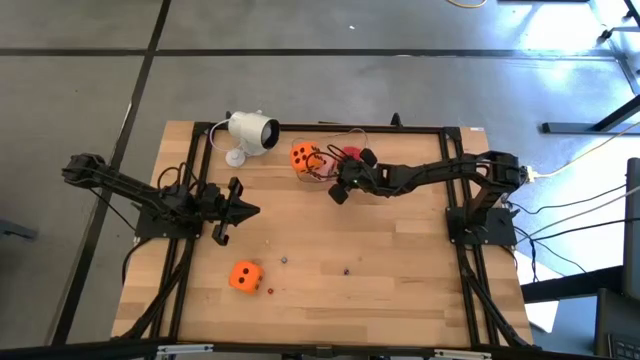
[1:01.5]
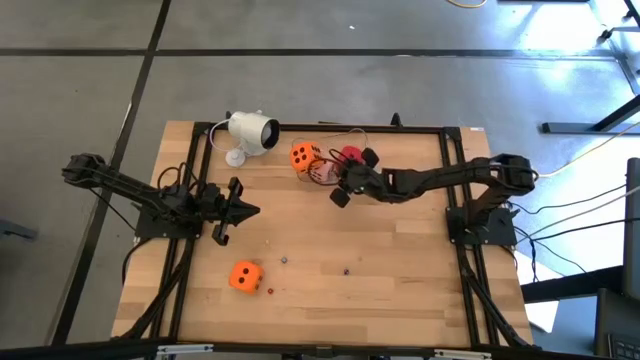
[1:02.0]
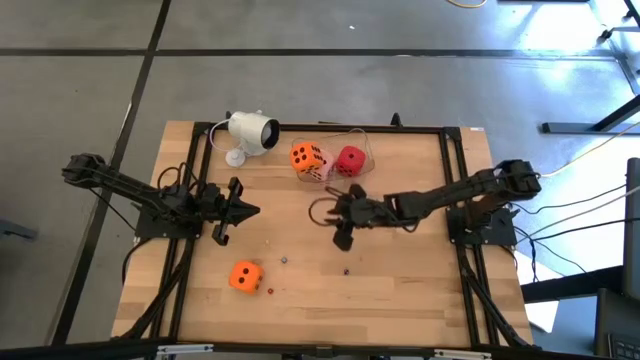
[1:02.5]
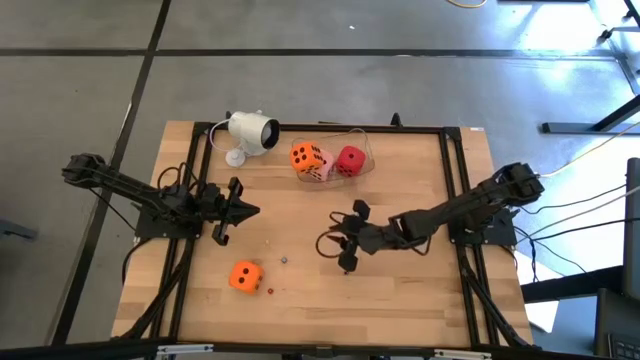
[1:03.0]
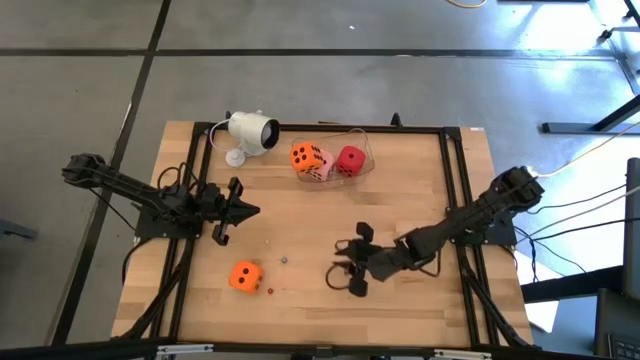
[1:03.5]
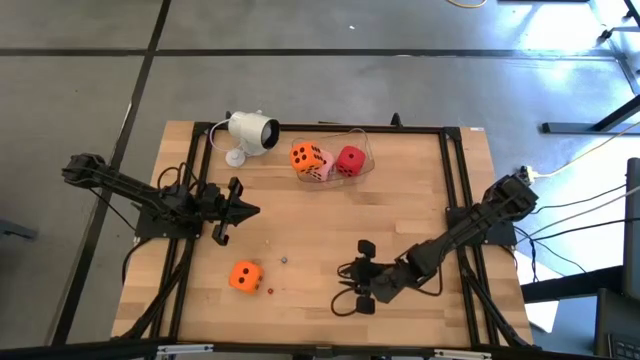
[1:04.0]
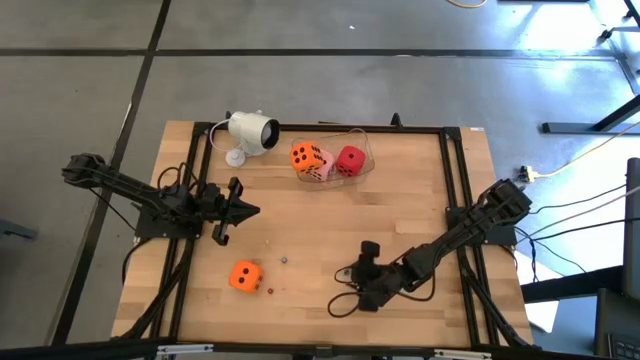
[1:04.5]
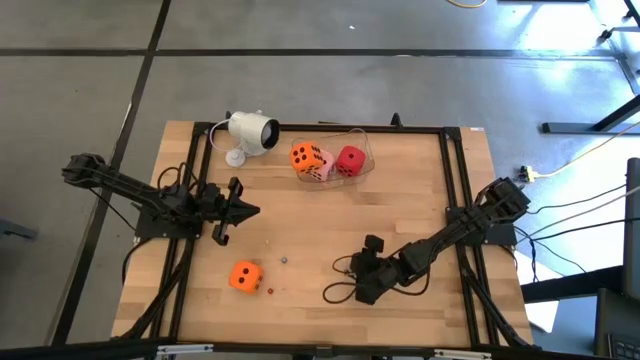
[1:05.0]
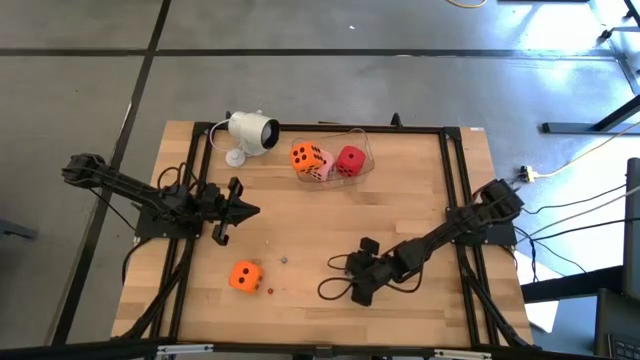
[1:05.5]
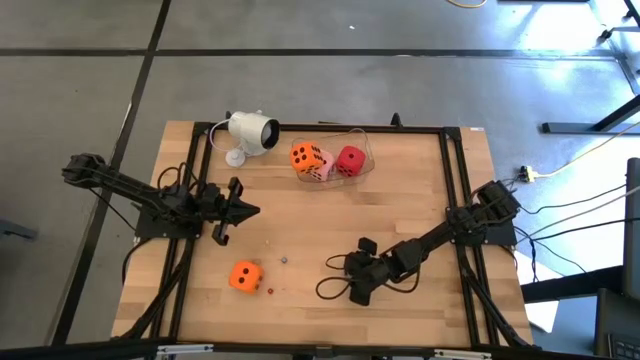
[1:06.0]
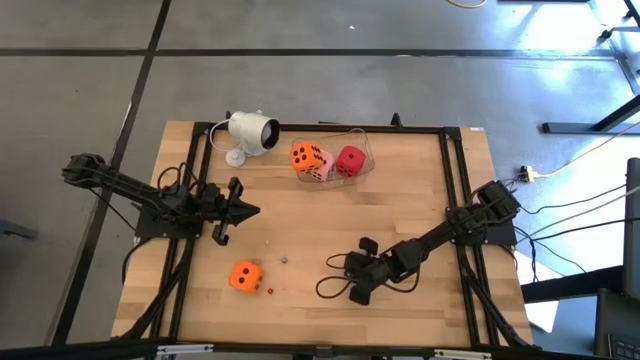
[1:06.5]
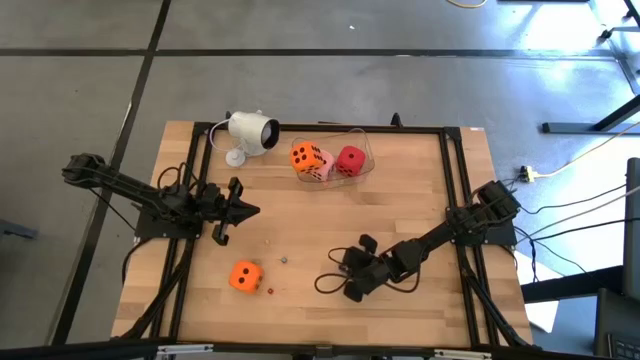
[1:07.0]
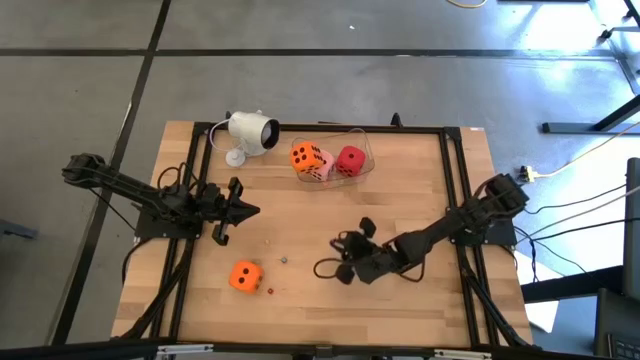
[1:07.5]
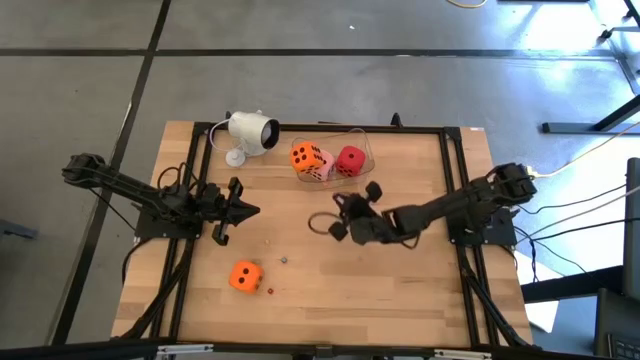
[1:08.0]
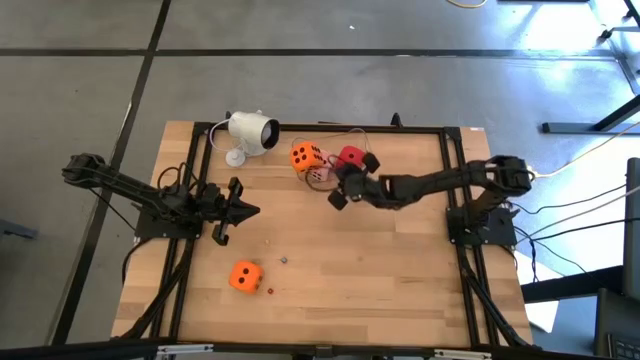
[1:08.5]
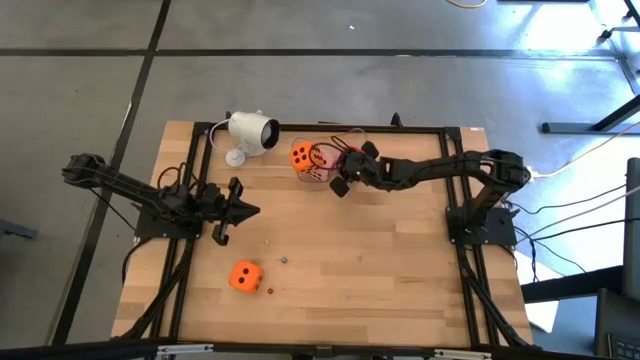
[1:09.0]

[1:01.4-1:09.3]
Task: Pick & Place Dice
Put the bottom small blue die into the transparent bin

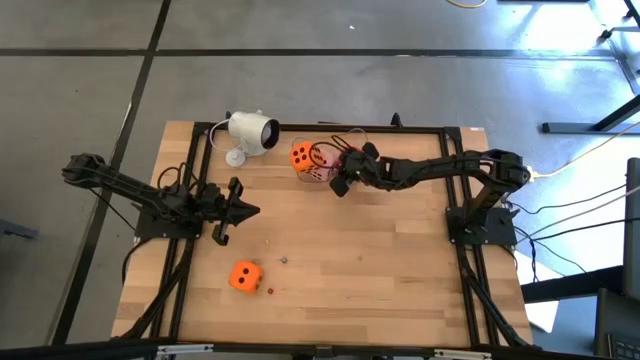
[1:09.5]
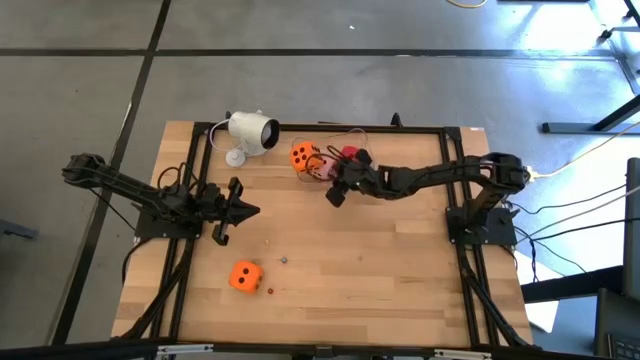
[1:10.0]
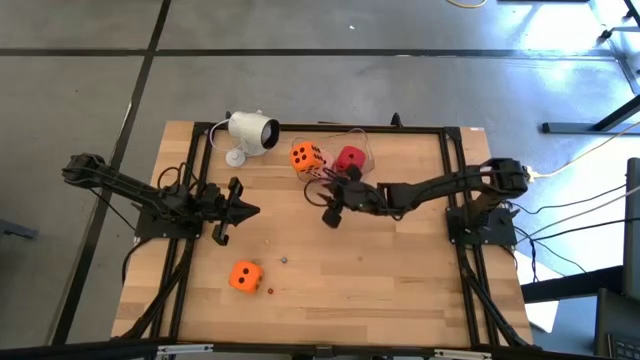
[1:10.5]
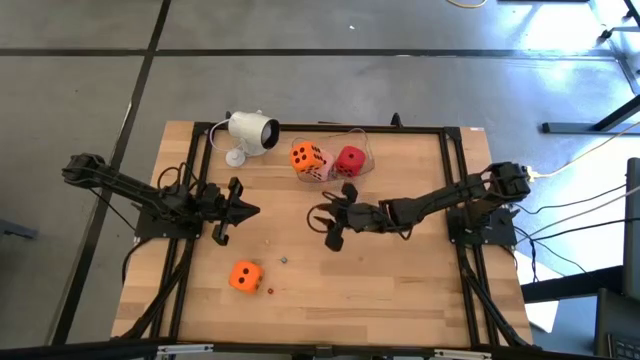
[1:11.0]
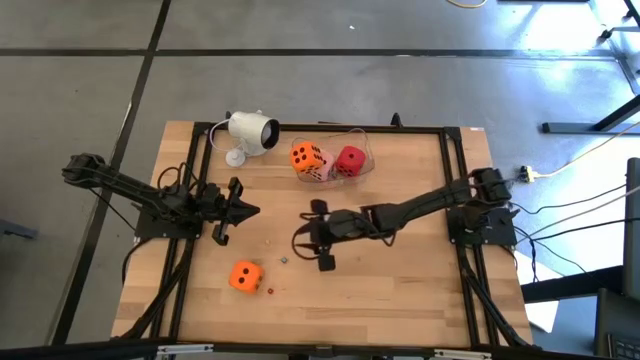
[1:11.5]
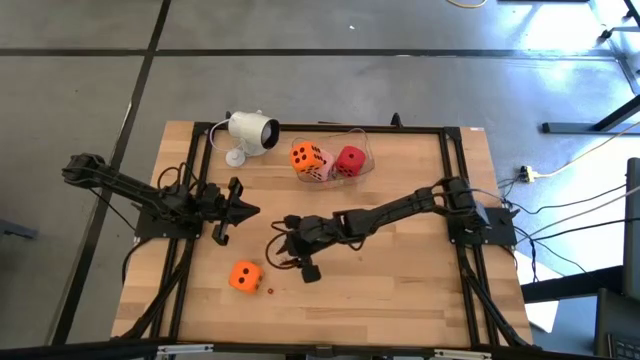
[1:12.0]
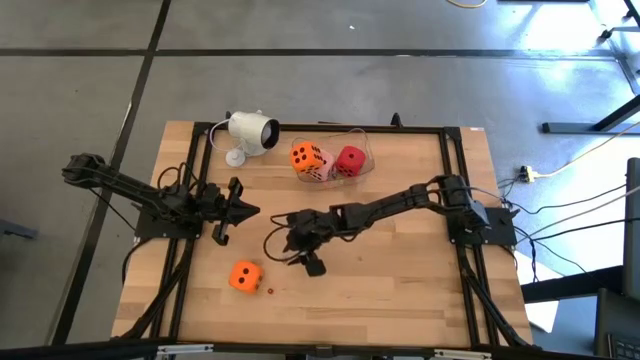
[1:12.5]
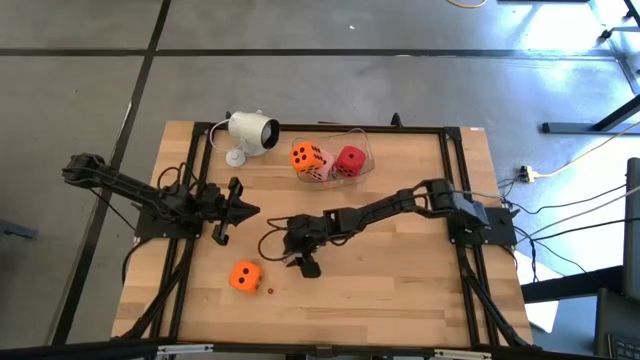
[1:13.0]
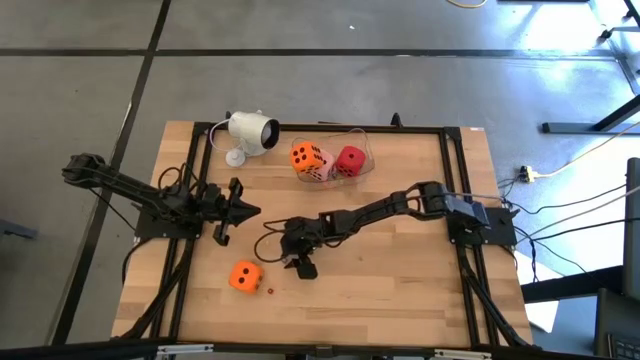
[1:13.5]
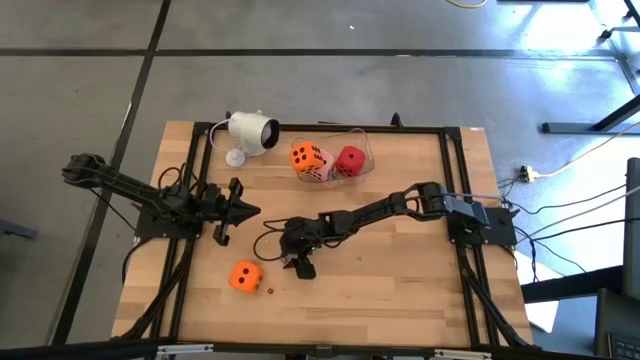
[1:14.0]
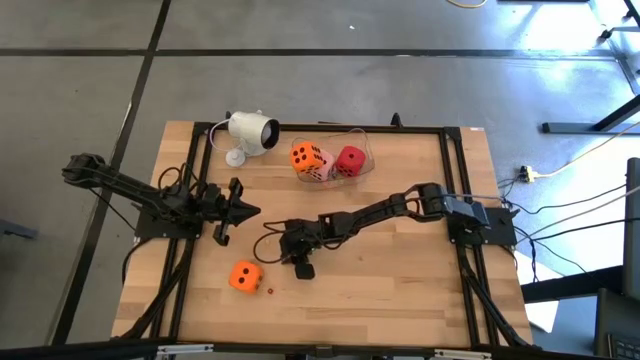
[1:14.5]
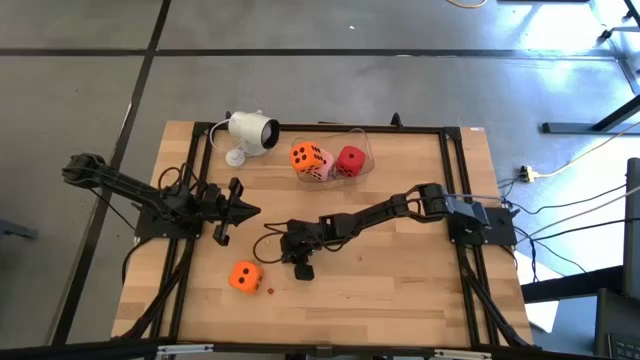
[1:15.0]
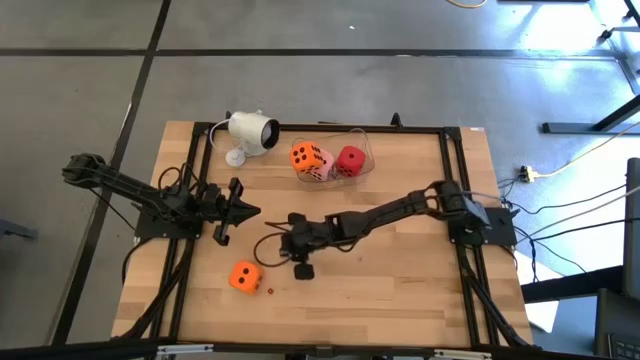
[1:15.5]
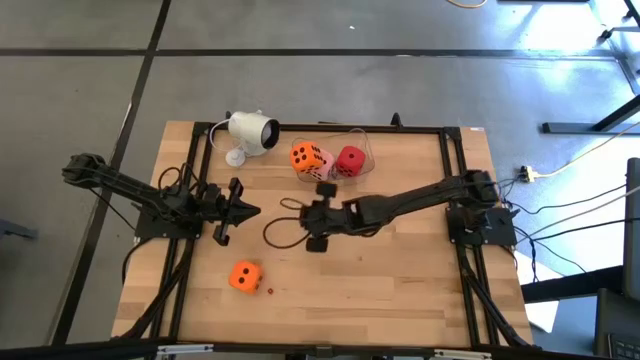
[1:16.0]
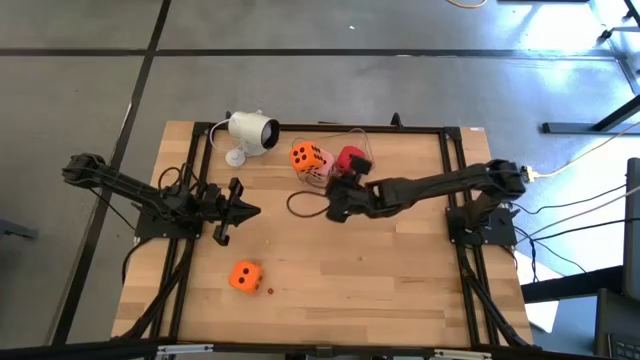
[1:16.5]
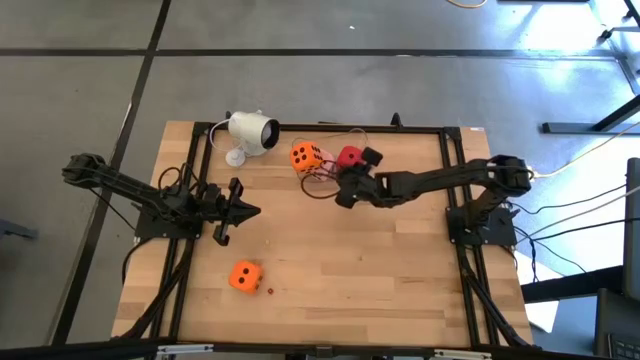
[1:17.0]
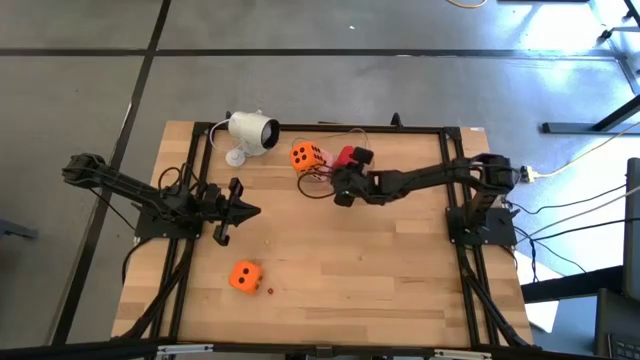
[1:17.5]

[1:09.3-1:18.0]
Put the small blue die into the transparent bin

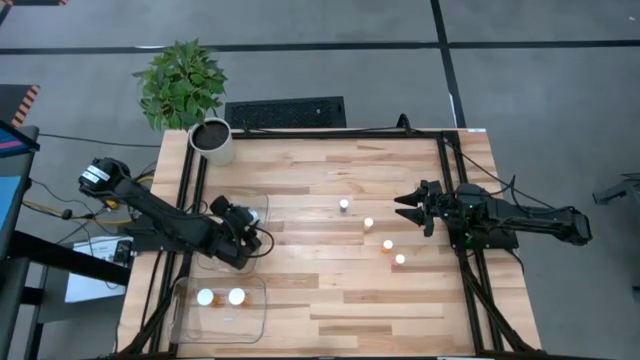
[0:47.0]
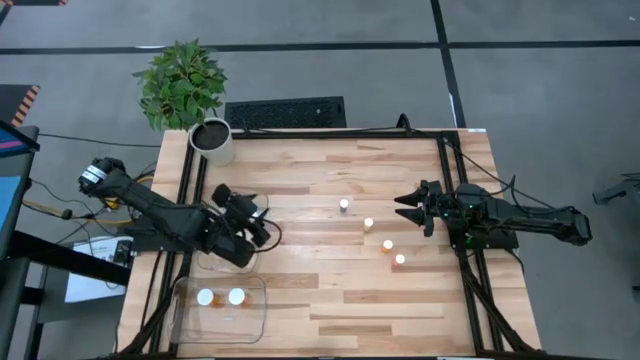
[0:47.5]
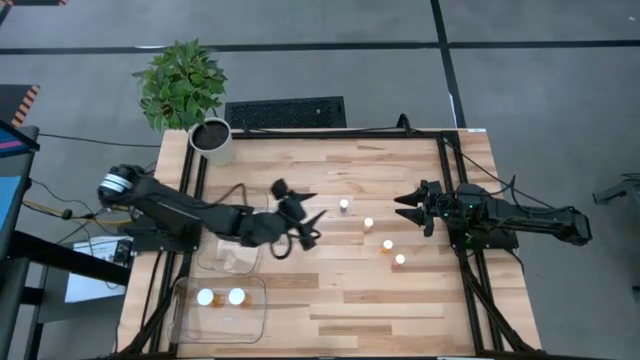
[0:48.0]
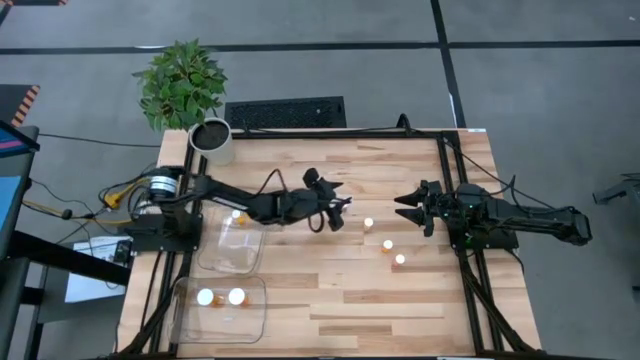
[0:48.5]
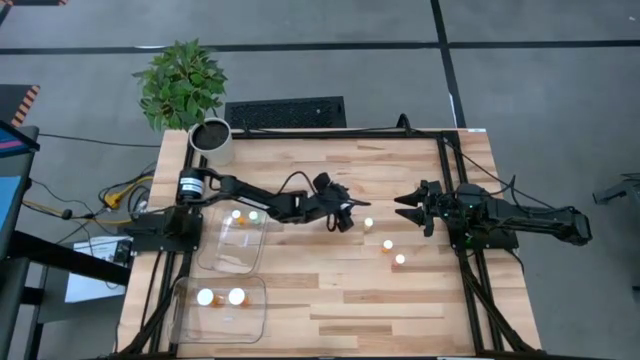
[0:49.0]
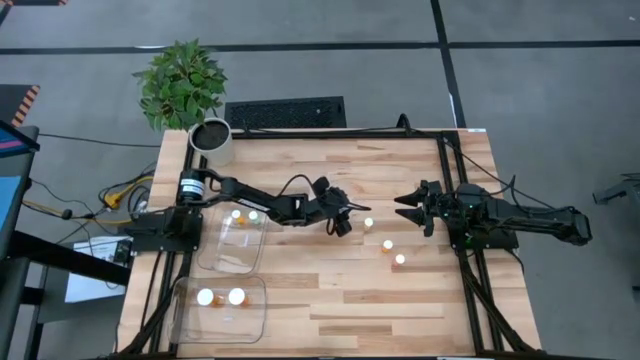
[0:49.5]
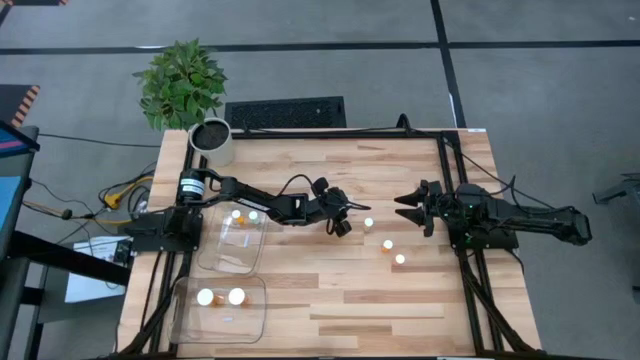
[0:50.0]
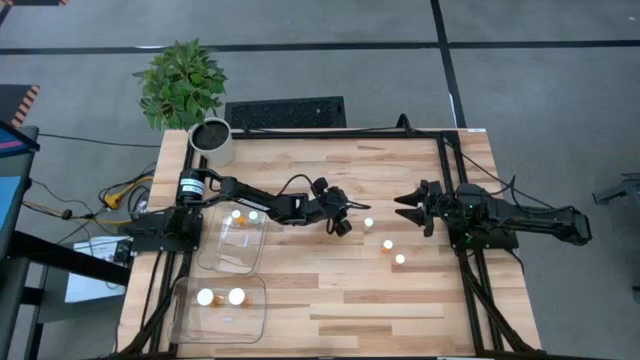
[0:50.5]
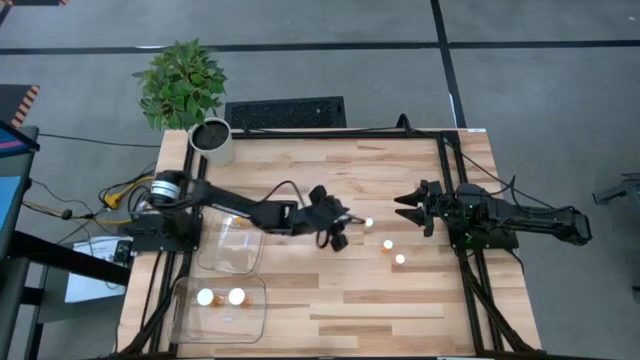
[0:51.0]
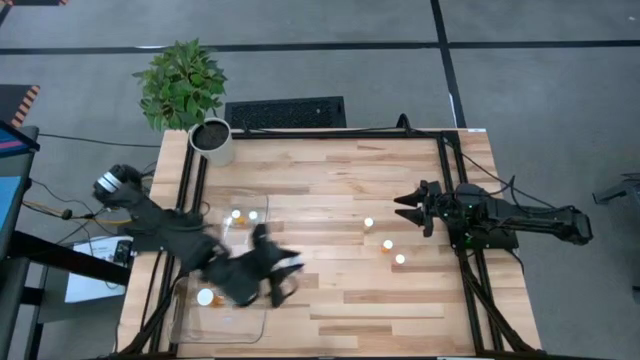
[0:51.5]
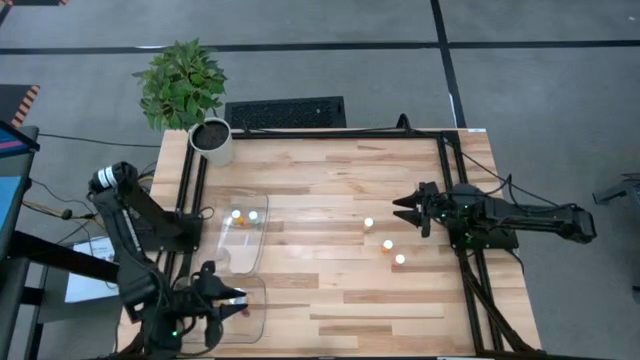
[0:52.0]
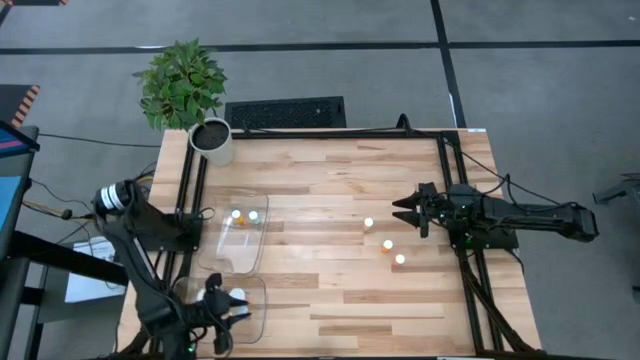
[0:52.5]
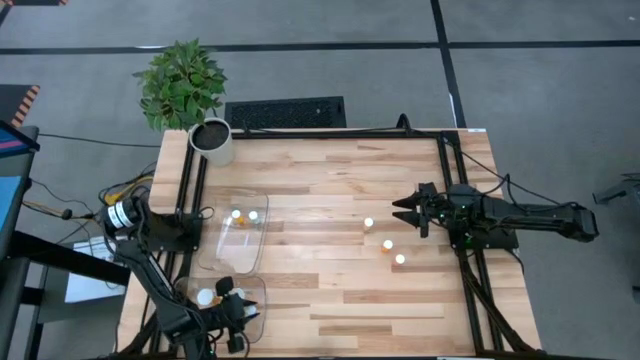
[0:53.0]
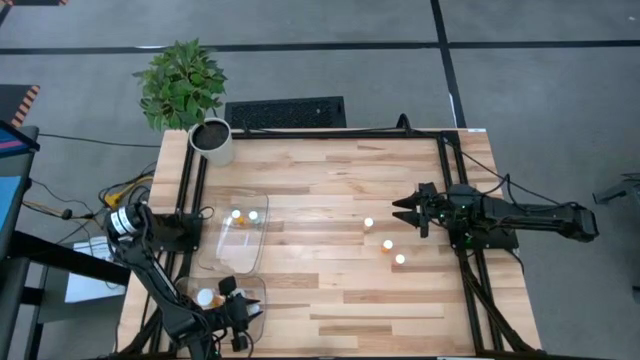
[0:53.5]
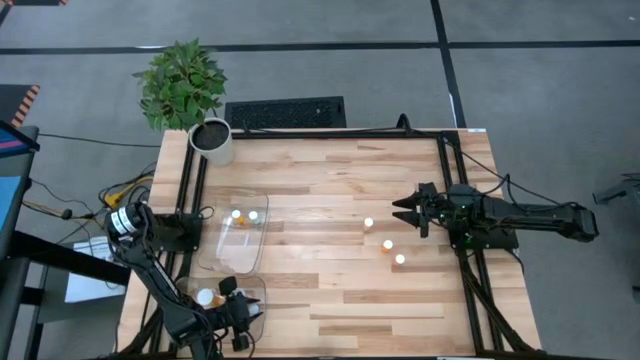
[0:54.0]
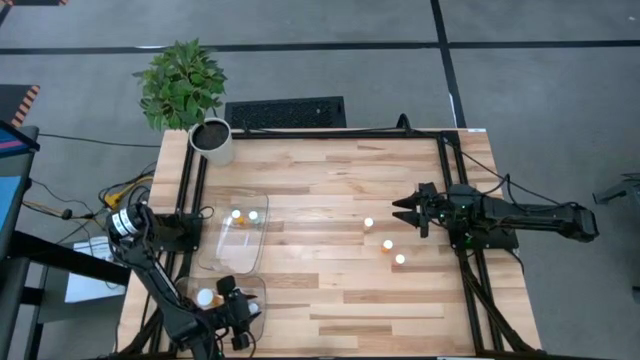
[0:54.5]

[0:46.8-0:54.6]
Task: Pick and place medicine bottles into bin by pill shape (circle, oval)
Put the blue capsule bottle into the bottom transparent bin
